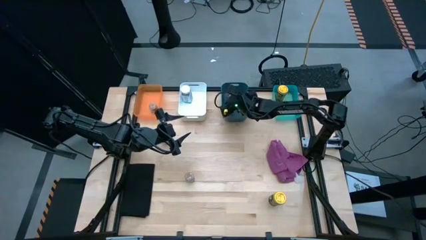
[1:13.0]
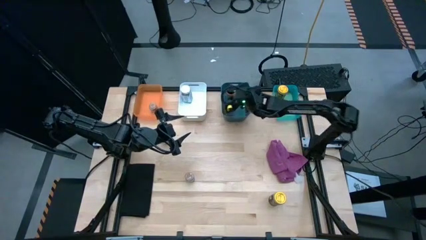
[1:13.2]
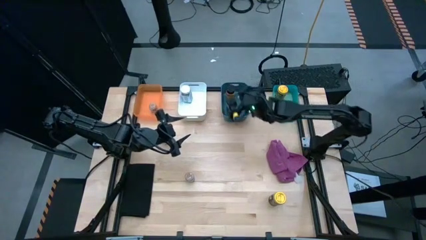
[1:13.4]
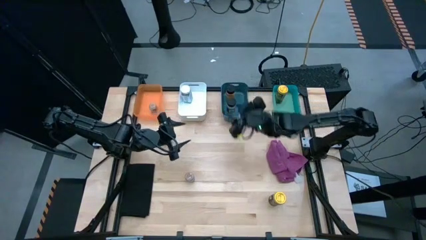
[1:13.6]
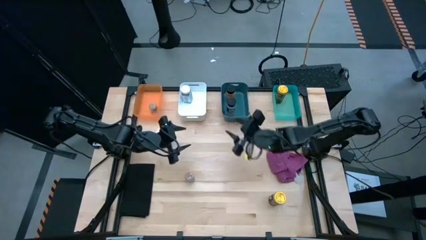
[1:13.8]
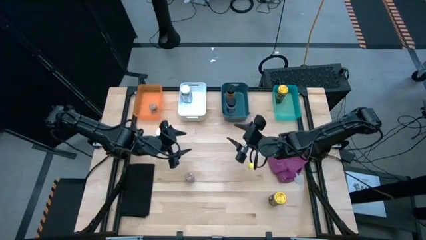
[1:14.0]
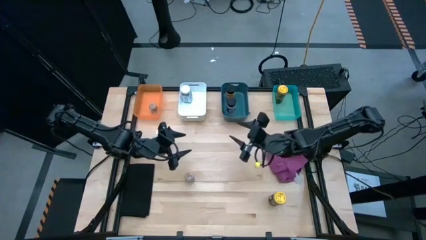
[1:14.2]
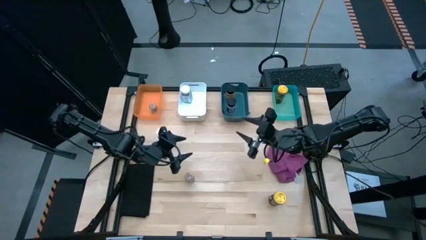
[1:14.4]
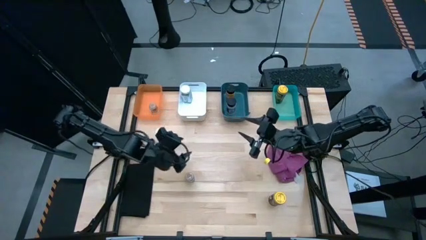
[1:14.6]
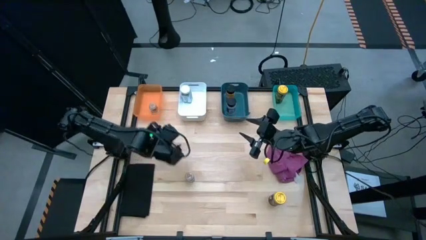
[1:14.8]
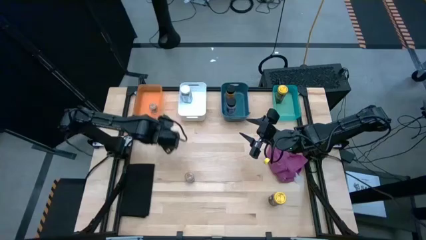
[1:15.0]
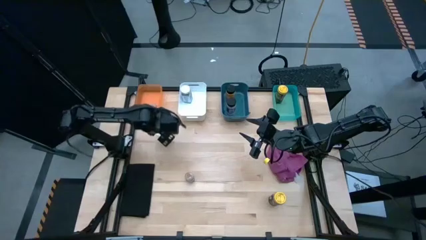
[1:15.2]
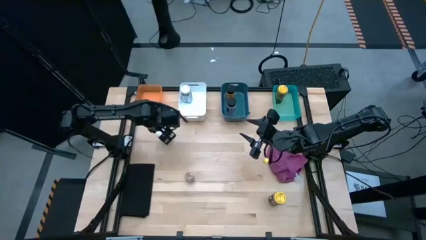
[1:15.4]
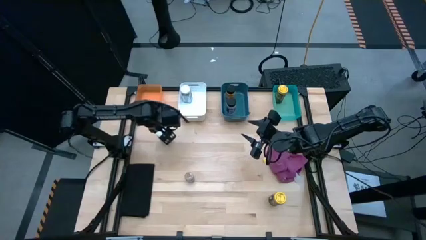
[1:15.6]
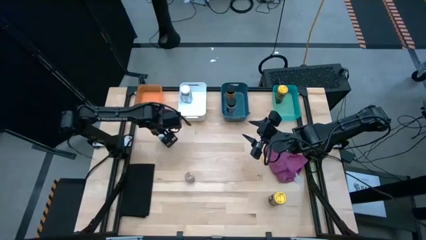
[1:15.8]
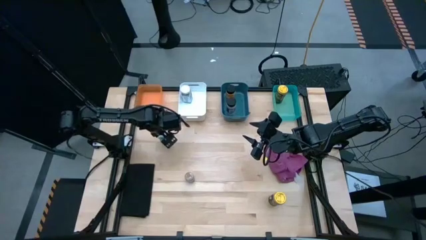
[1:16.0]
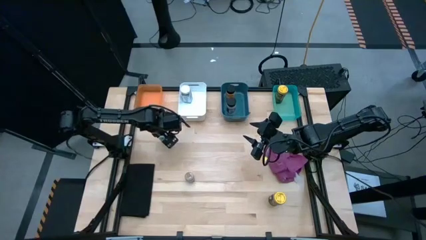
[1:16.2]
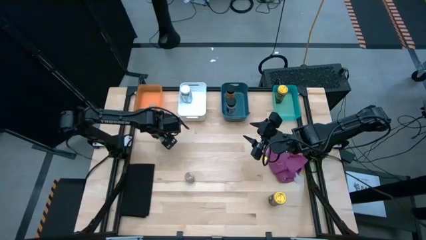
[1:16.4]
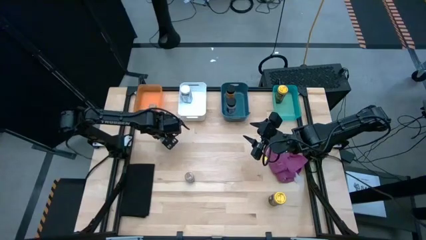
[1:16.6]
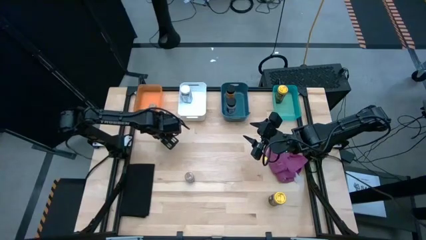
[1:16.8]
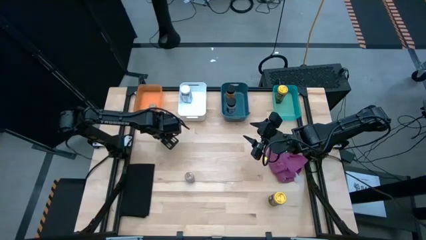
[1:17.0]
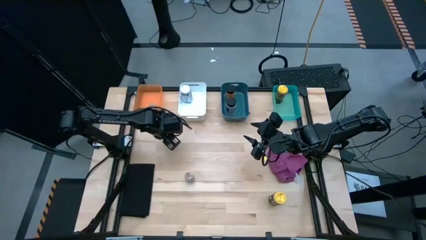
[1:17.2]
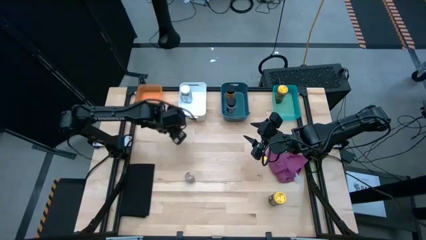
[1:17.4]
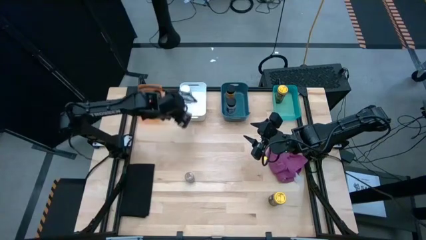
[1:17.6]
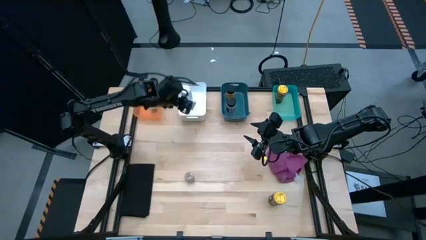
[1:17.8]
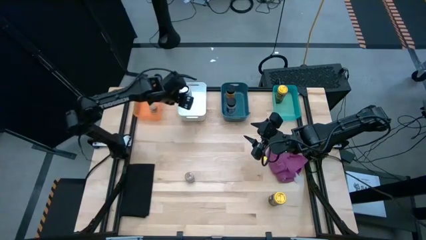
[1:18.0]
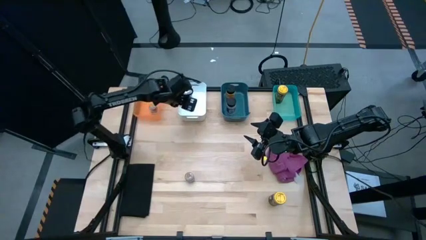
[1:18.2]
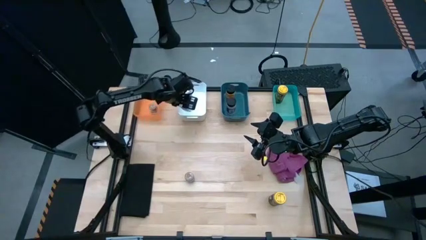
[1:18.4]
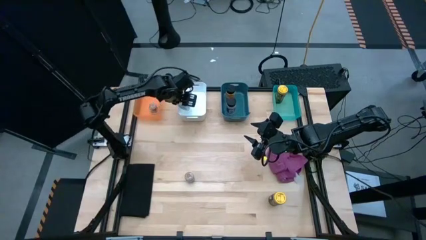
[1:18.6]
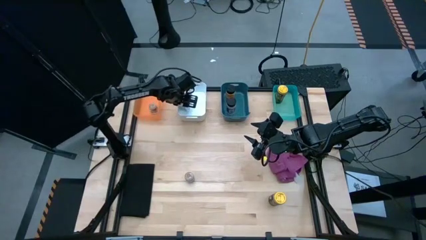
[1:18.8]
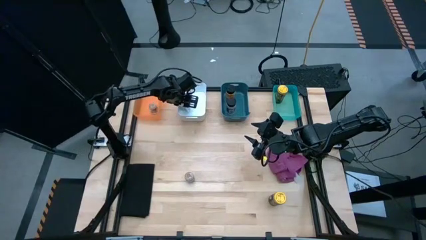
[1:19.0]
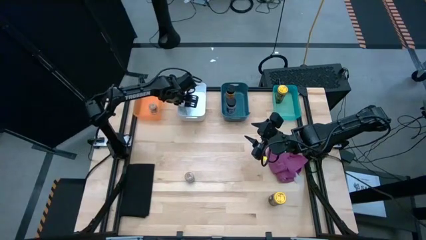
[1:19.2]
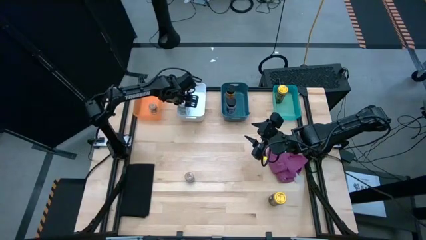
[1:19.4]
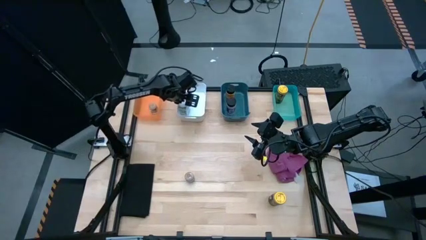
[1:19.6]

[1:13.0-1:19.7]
Task: Sort spices by type
Put the white seasoning bottle into the white bin

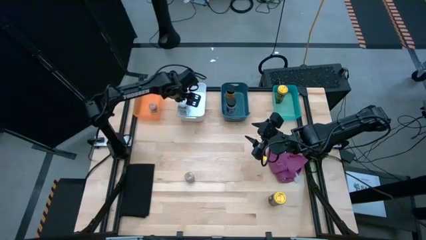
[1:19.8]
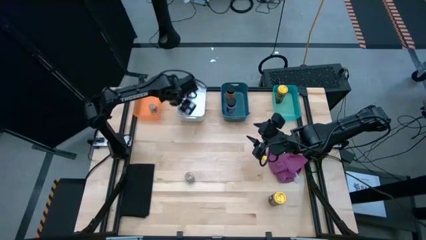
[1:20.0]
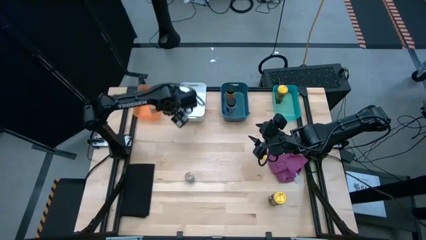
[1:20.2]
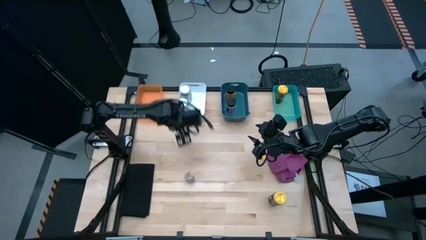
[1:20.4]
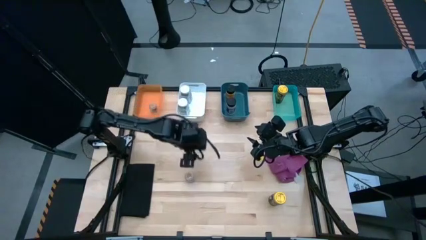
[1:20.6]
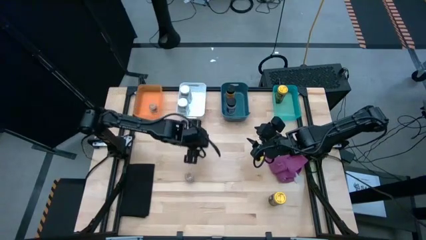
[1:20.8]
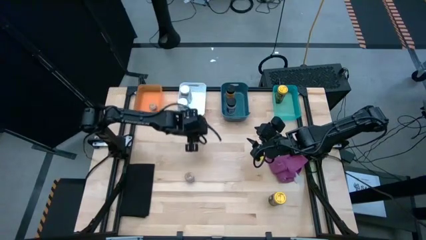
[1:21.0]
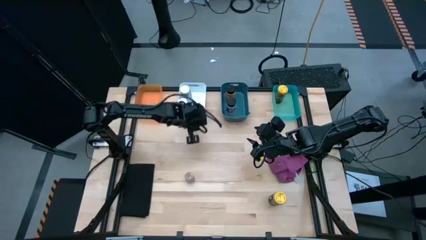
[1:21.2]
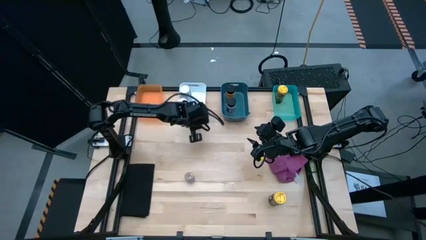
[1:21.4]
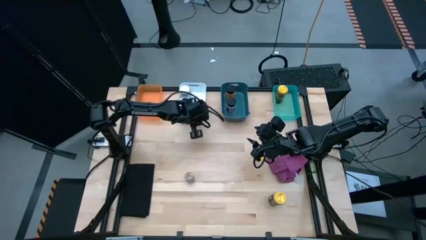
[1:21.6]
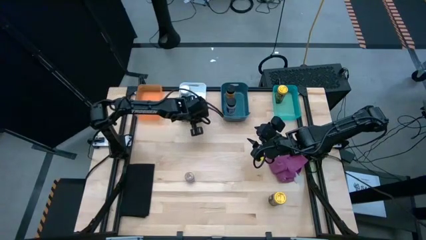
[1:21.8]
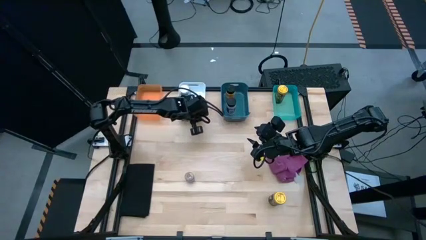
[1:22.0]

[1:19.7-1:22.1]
Adjust the white bin on the table

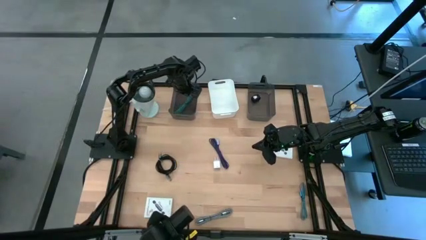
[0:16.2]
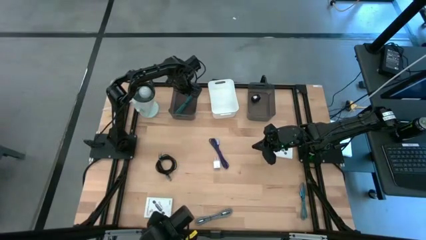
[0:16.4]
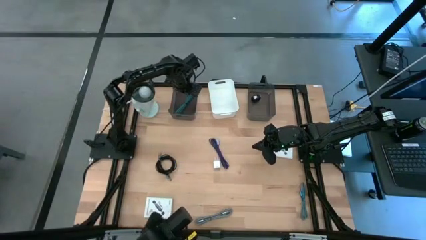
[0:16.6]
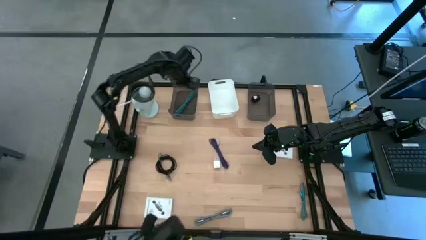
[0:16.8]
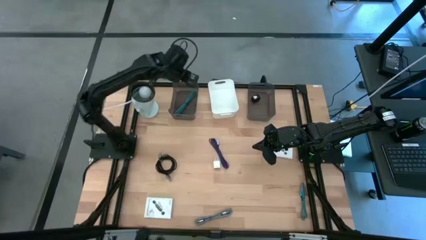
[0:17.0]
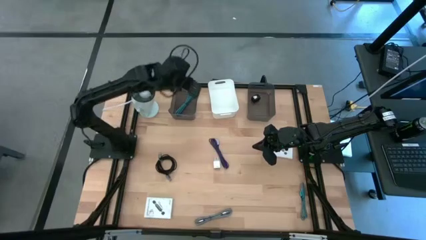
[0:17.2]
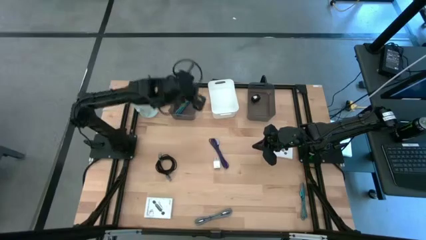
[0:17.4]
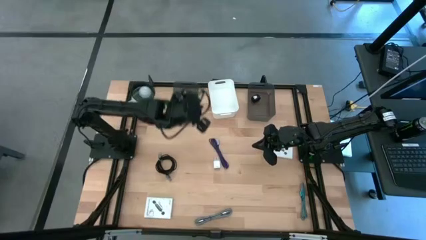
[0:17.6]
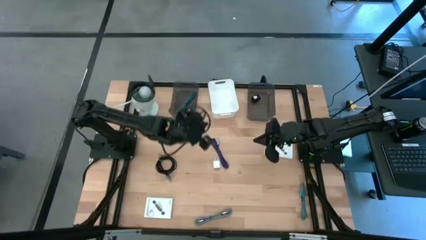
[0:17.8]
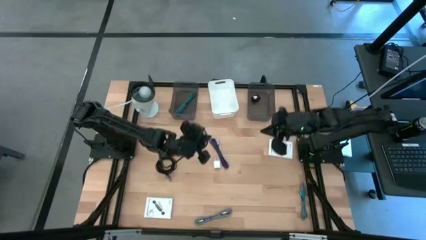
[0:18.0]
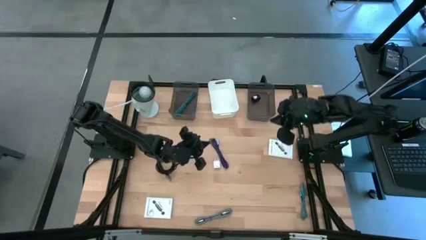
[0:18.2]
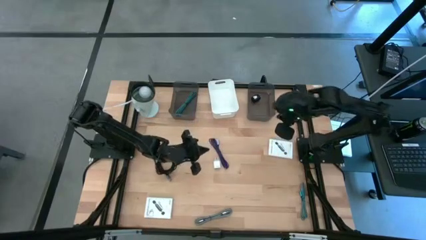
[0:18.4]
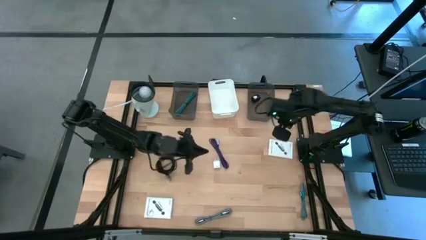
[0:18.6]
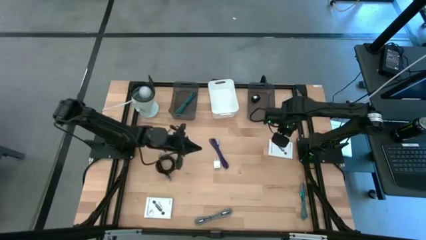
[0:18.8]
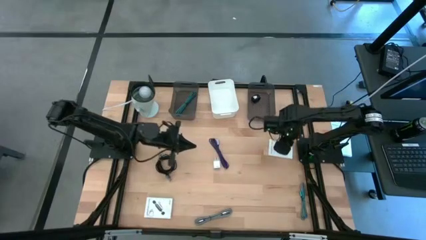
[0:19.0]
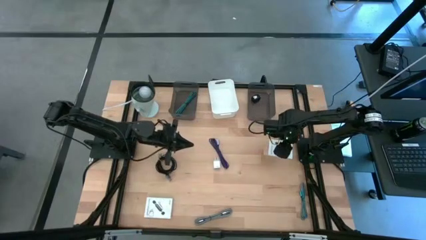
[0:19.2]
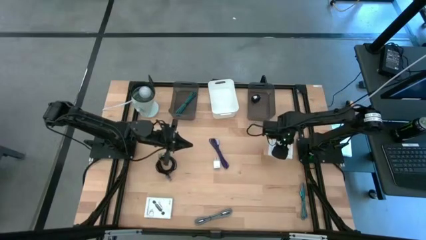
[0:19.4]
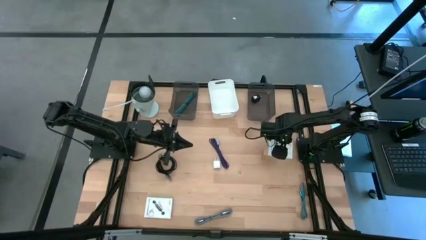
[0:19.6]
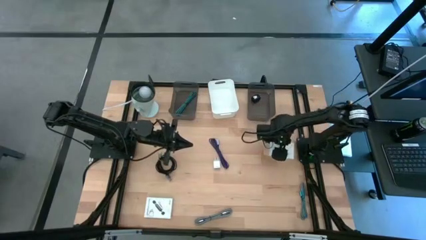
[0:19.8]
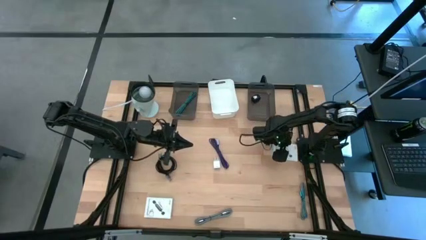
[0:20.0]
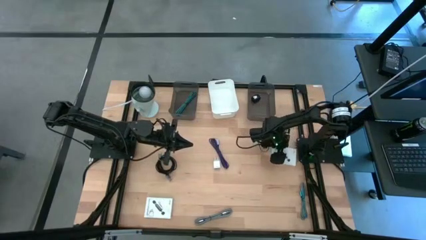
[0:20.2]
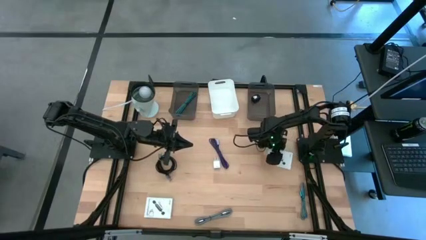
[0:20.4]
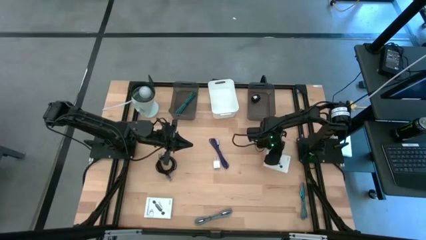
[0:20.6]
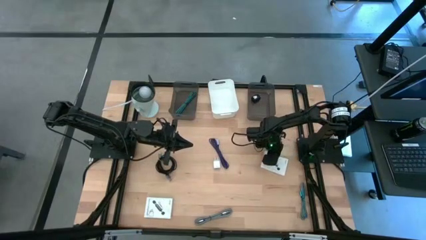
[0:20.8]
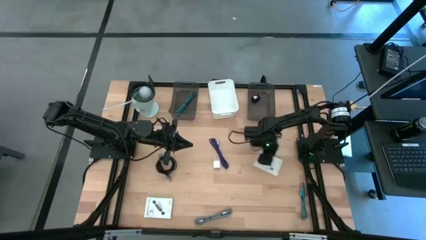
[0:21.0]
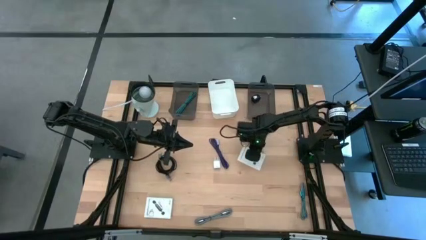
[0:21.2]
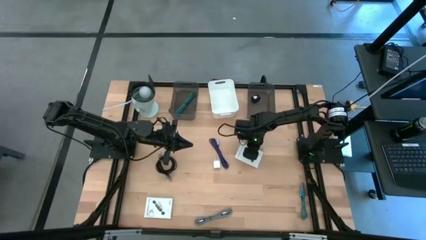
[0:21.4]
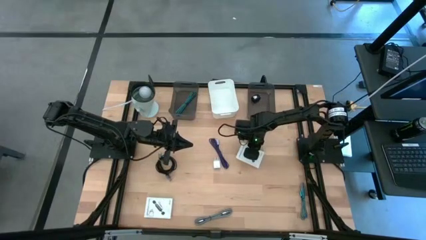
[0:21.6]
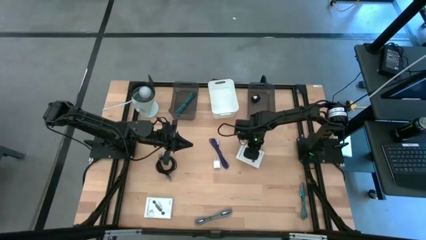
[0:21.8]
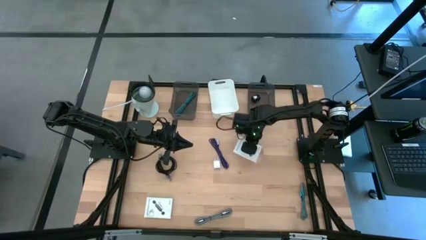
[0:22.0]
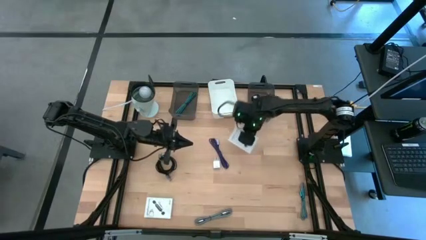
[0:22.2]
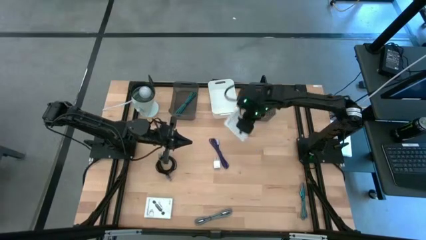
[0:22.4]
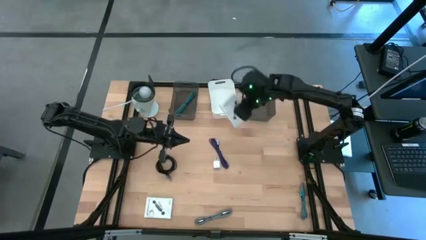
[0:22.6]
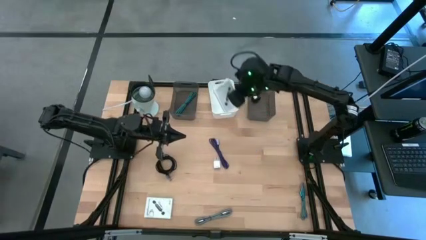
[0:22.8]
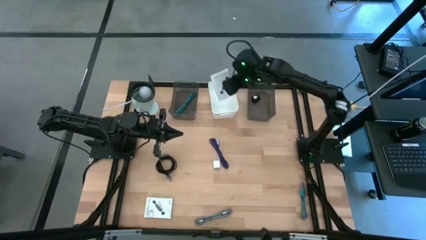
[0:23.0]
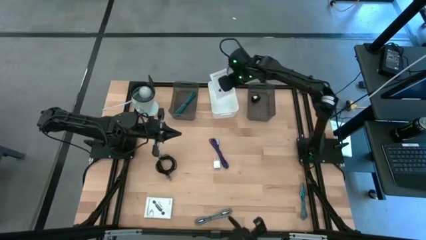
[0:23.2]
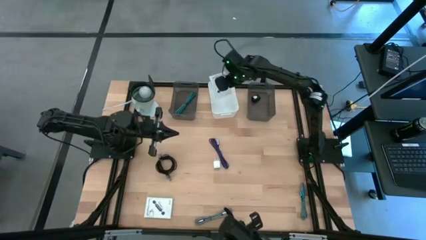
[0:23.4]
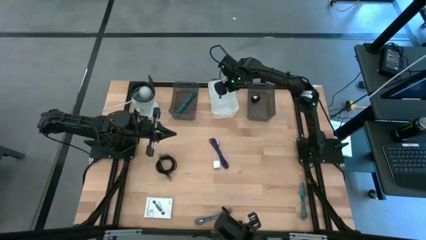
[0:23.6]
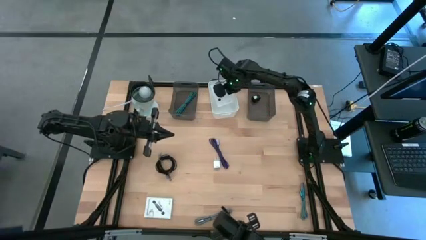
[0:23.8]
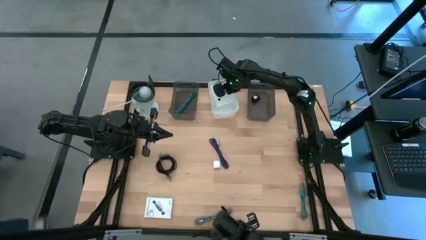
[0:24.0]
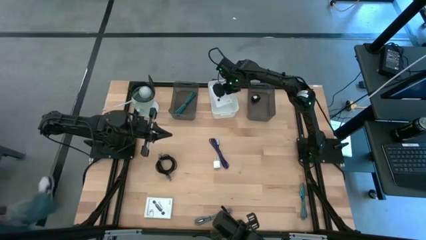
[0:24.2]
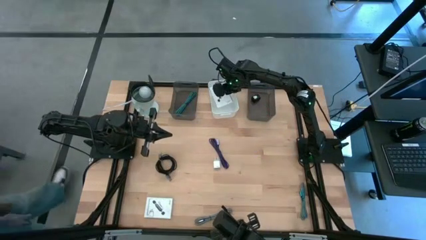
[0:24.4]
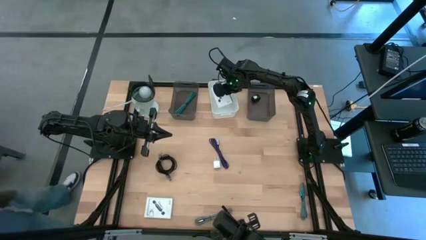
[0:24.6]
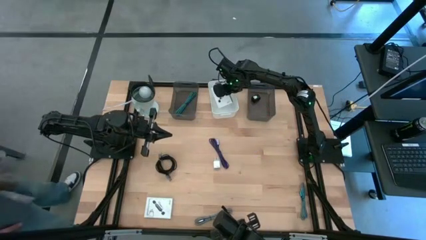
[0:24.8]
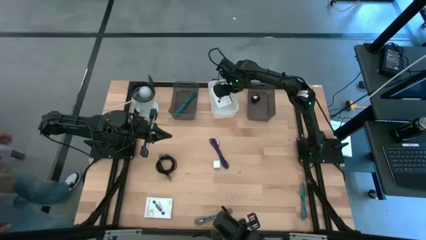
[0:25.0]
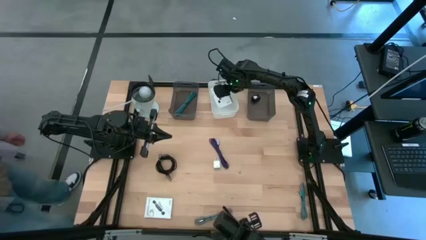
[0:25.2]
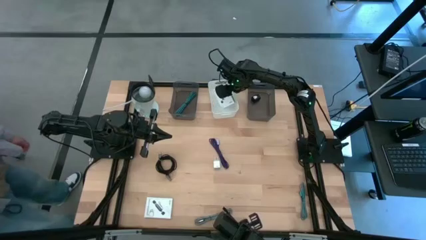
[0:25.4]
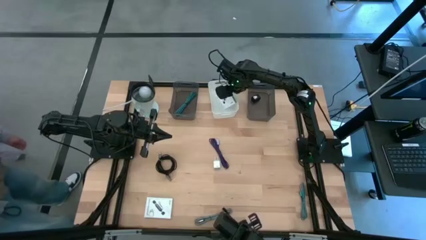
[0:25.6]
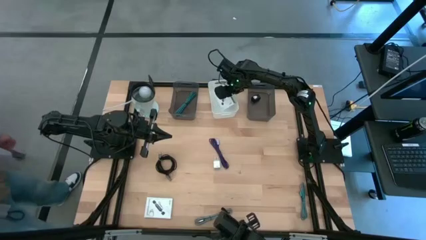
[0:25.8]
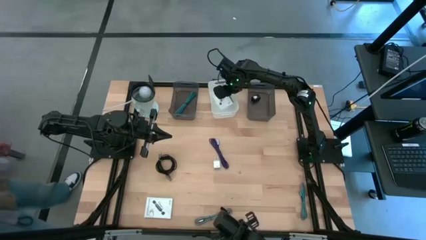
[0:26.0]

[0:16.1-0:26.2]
Task: Pick and place items into bin
Put the right white card reader box into the white bin
